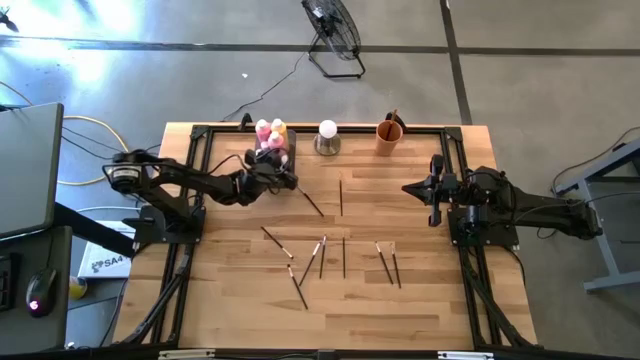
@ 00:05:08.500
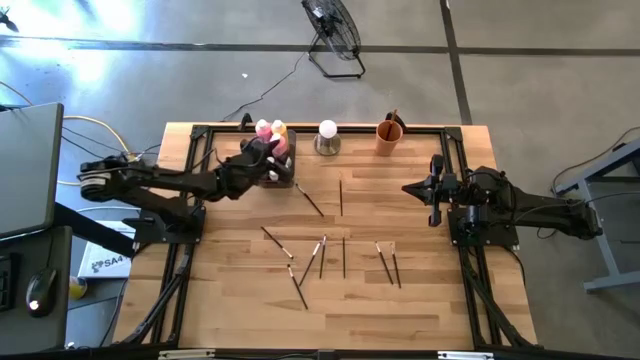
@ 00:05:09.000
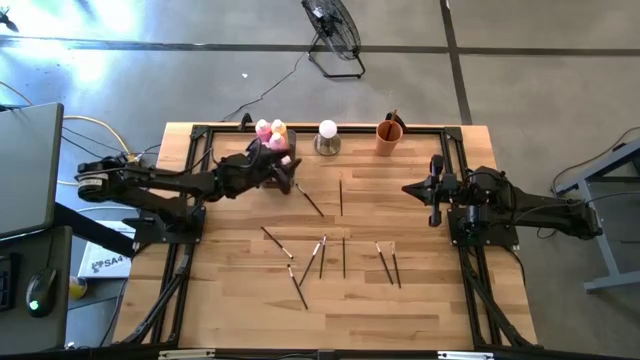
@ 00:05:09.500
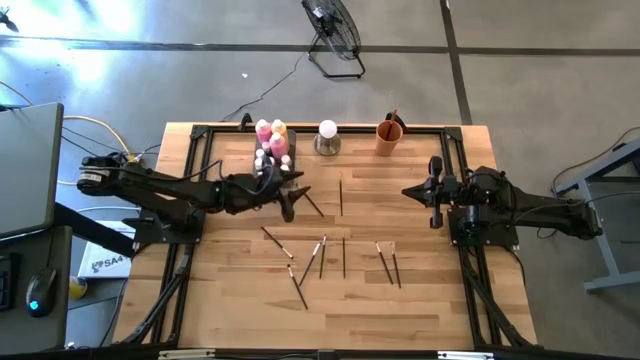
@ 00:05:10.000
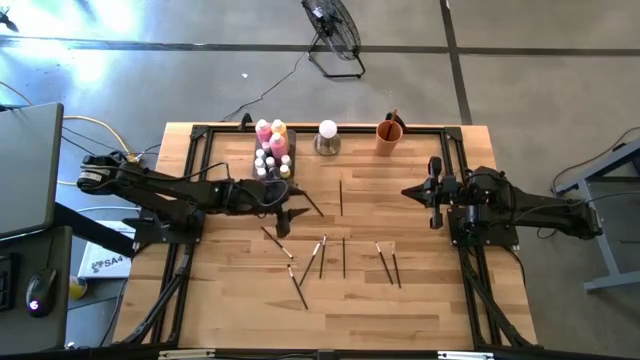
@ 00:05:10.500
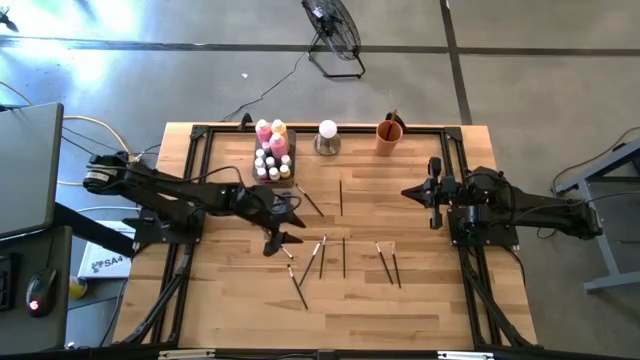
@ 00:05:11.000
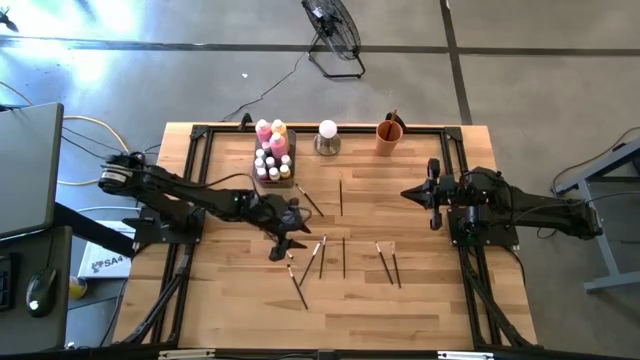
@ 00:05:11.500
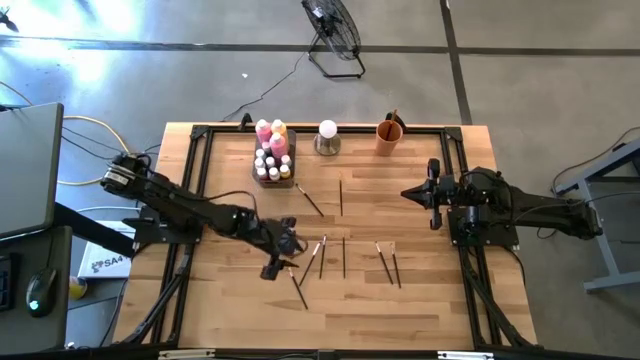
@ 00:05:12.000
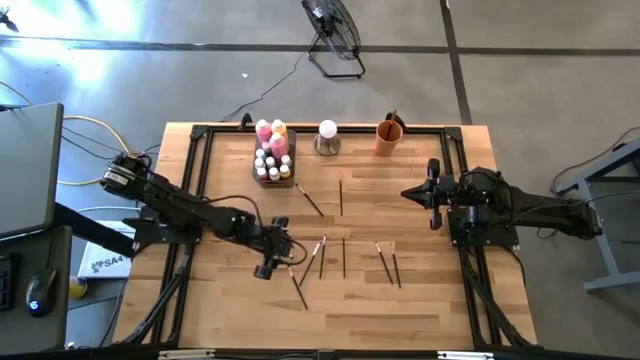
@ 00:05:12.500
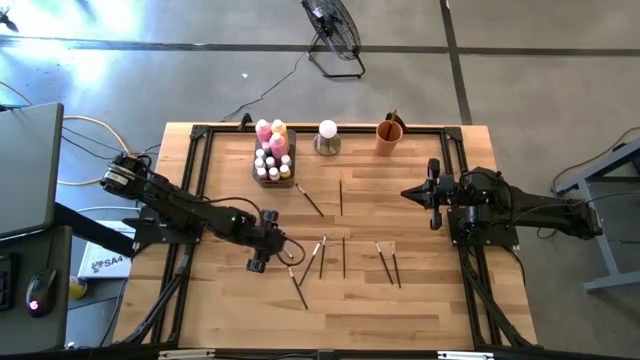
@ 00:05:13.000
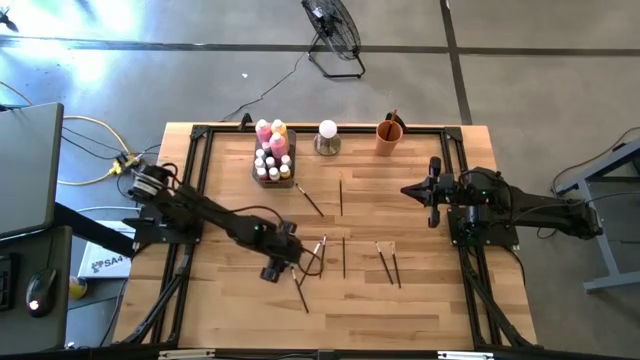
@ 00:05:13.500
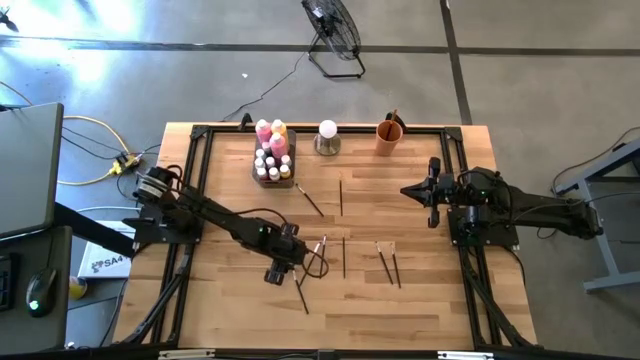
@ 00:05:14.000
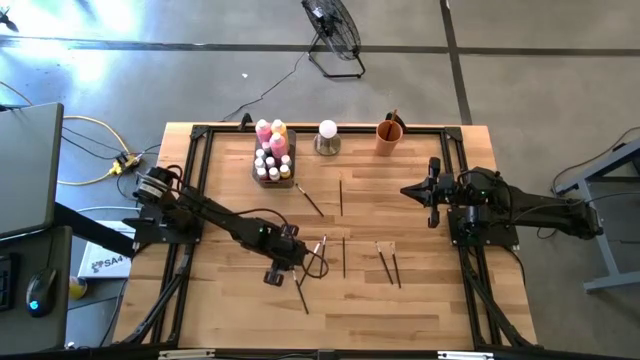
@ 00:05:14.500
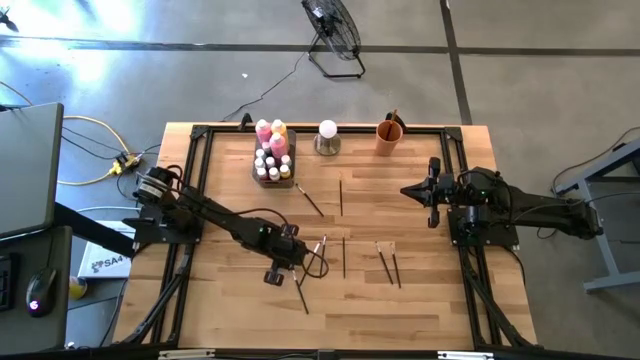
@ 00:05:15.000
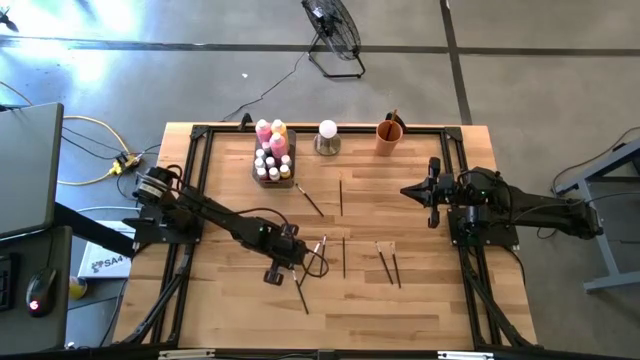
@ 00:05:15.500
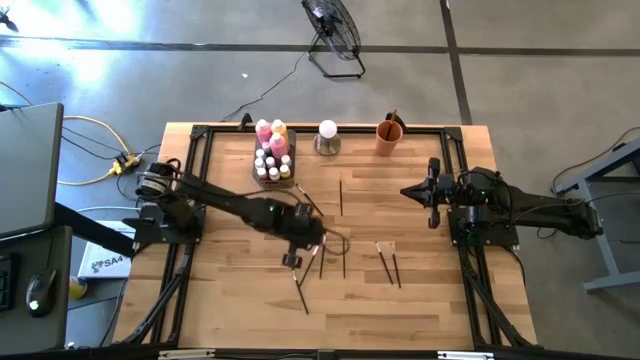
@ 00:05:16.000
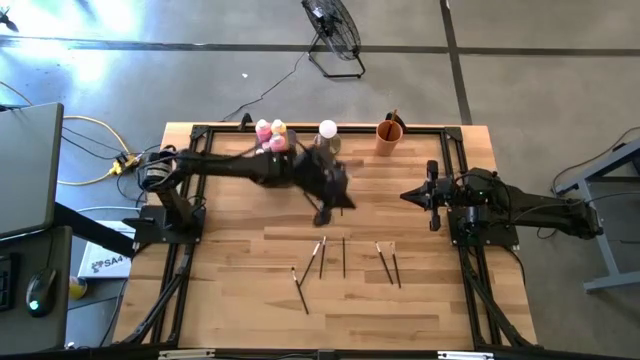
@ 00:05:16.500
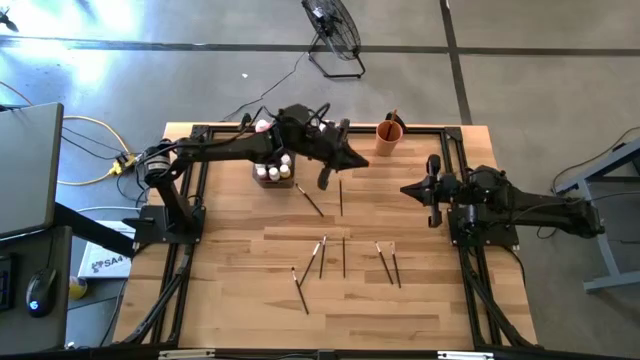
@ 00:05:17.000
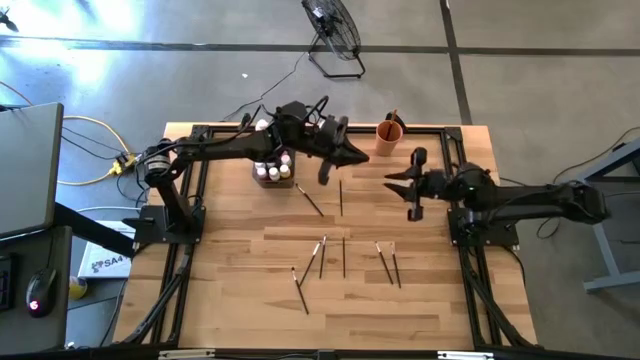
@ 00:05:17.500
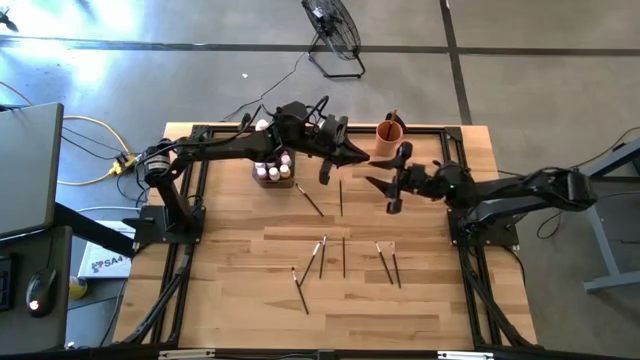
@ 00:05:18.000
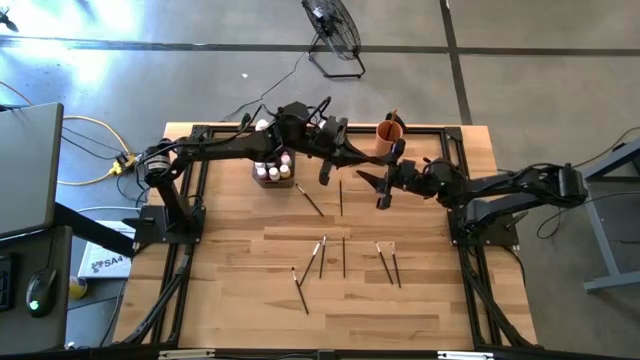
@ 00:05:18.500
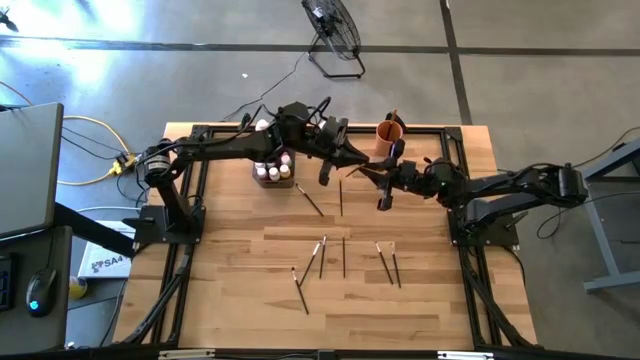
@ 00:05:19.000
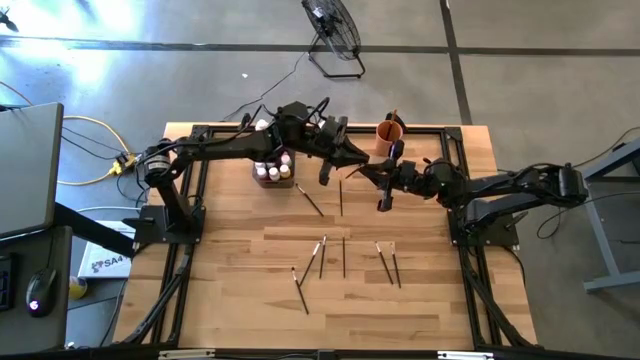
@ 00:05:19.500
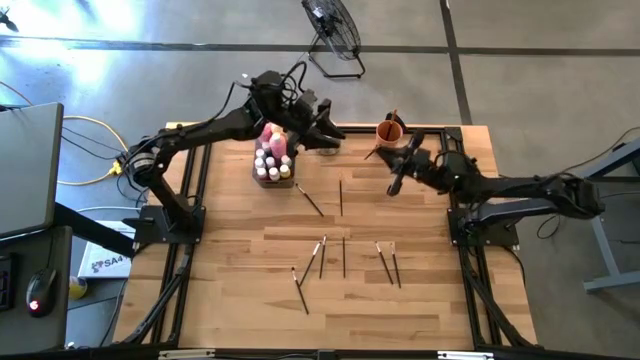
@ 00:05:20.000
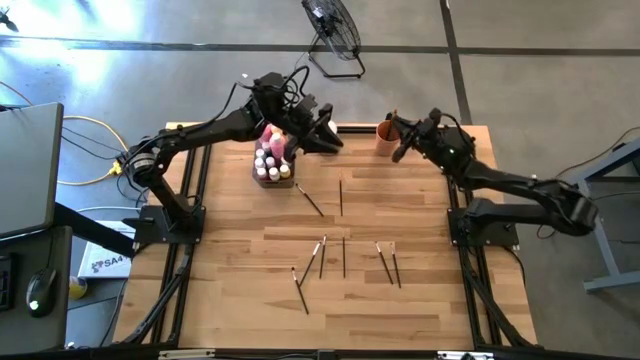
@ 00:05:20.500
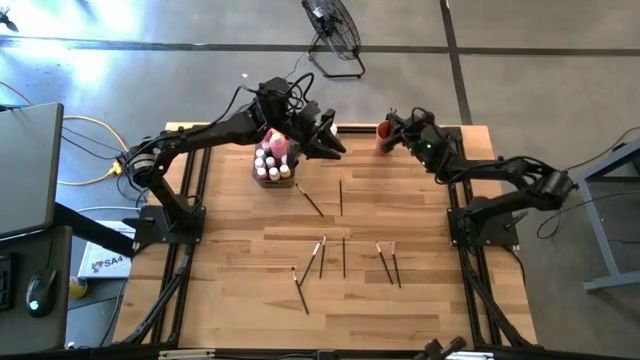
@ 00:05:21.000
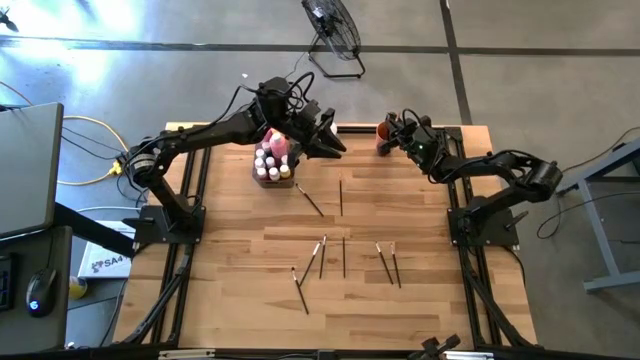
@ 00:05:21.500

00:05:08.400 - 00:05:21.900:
Task: Pick & Place Paint Supplies
Put the silver paintbrush into the orange cup

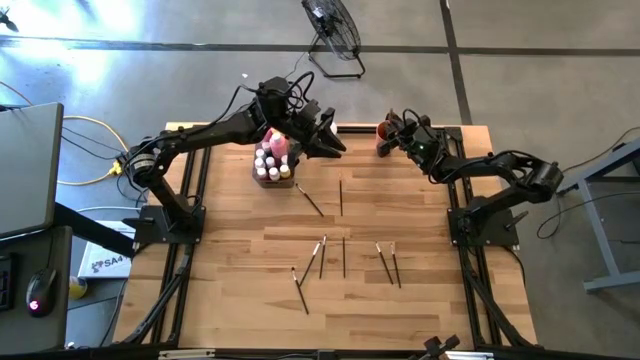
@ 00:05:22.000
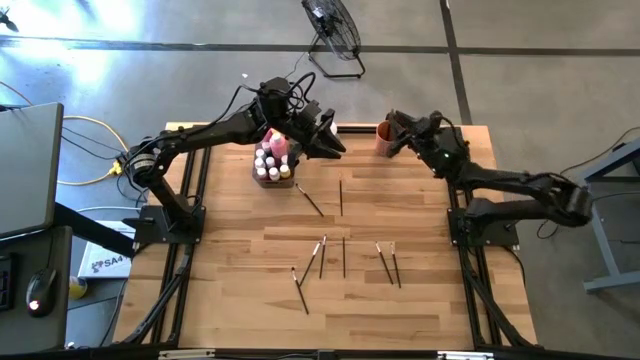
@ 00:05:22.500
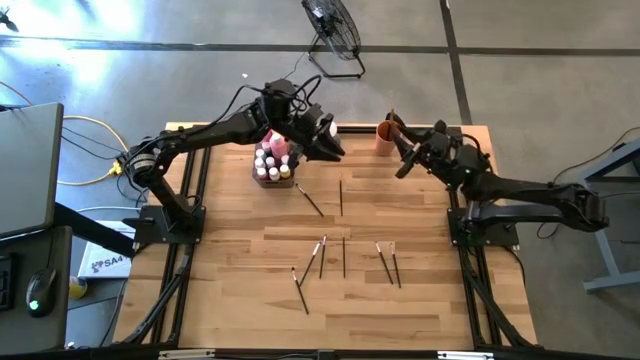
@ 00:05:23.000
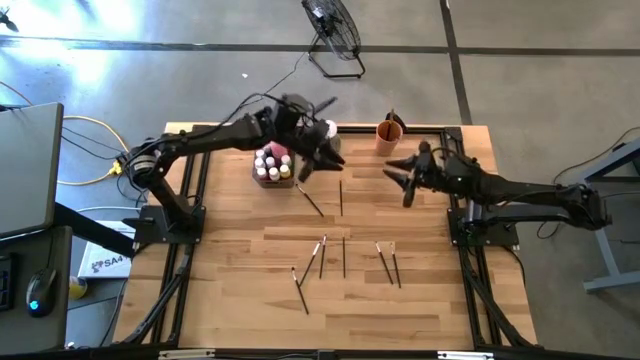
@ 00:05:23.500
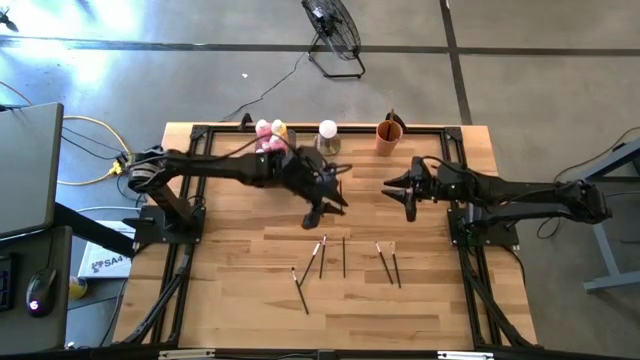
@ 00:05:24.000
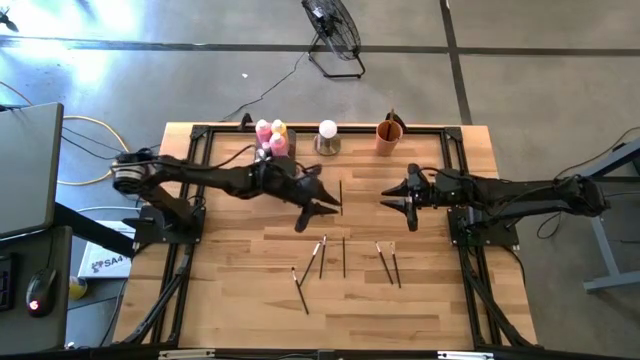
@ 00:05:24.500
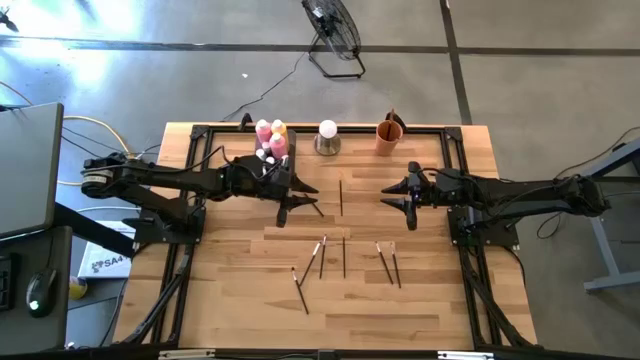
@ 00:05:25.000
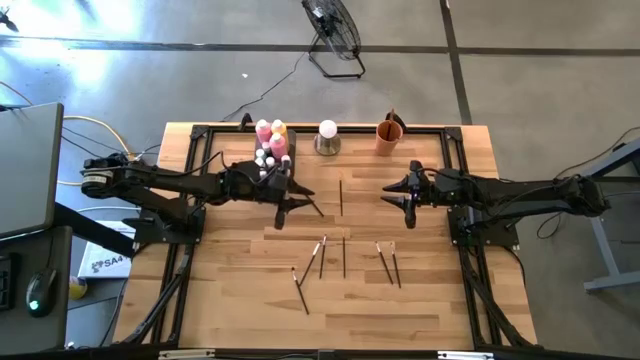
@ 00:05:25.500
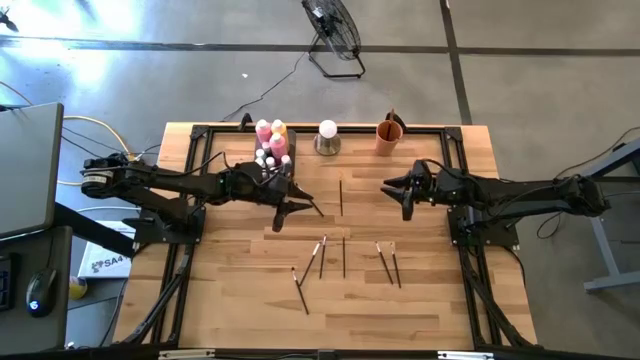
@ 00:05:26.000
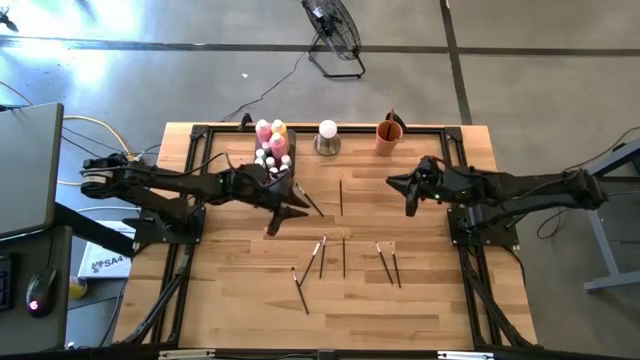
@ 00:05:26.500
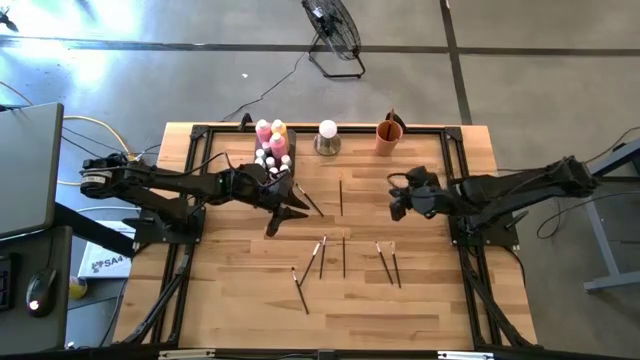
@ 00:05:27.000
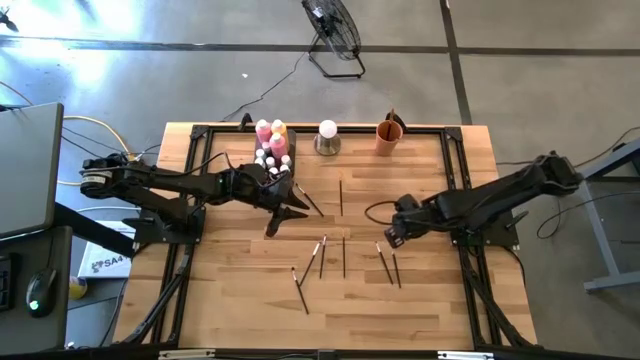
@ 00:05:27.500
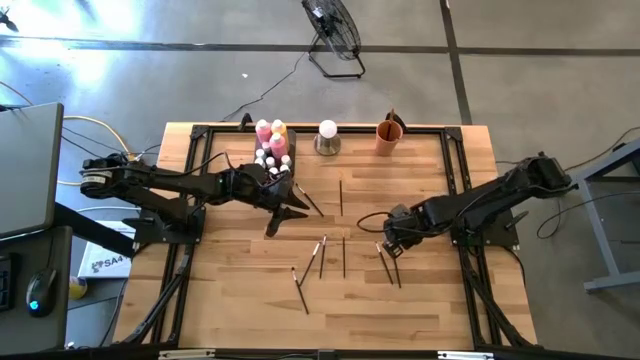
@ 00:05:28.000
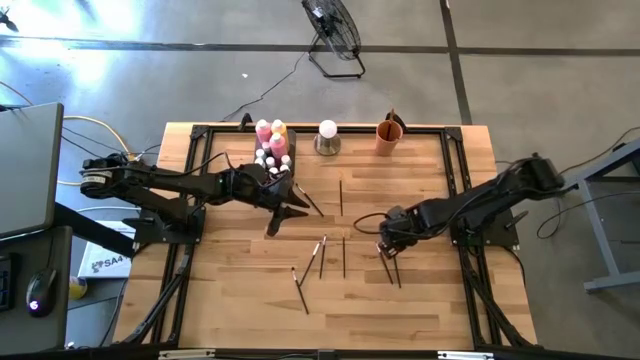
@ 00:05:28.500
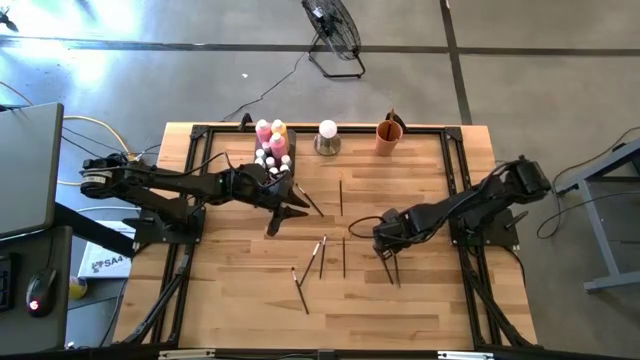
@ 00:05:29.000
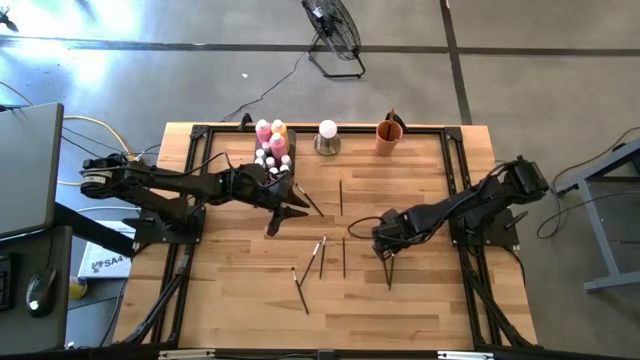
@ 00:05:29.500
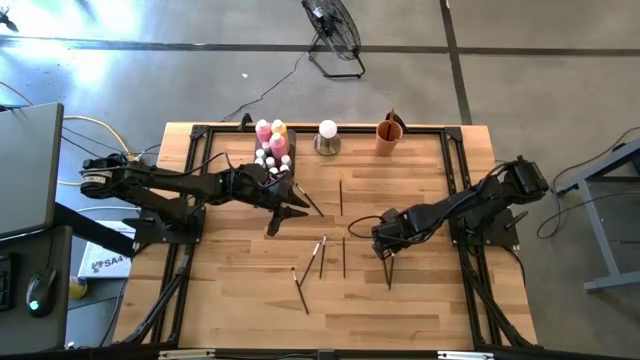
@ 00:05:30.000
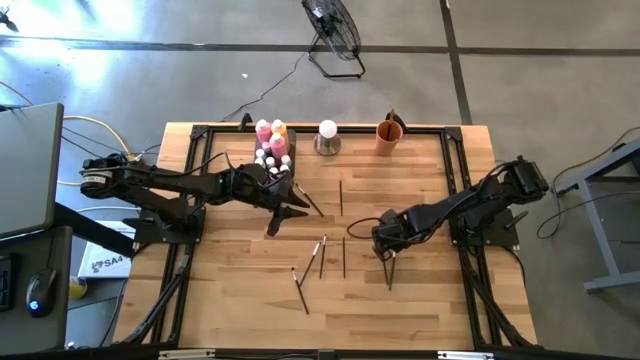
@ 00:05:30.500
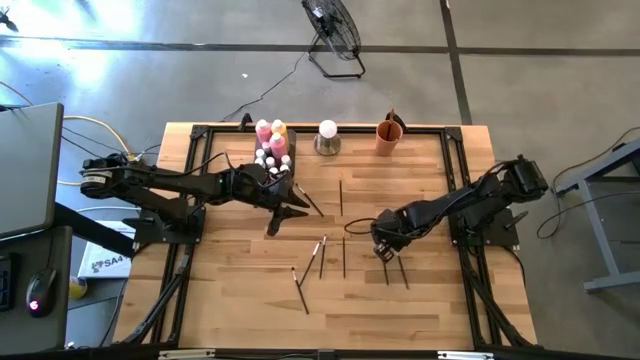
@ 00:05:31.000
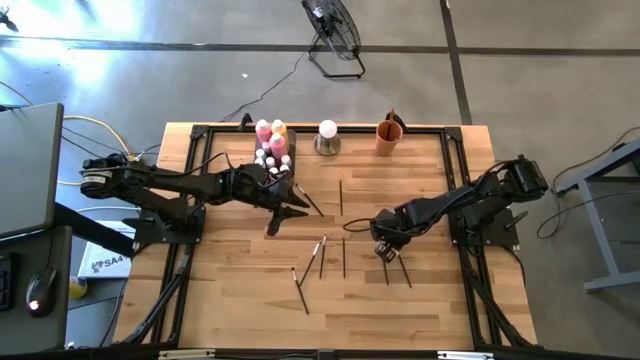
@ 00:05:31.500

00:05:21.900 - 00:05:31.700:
Put the silver paintbrush into the orange cup
